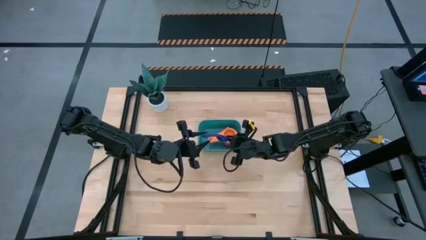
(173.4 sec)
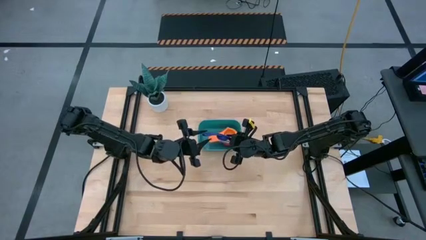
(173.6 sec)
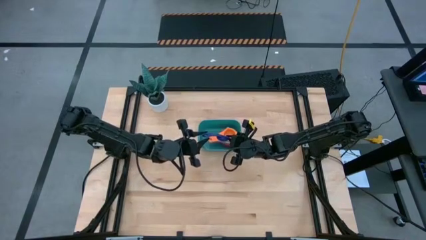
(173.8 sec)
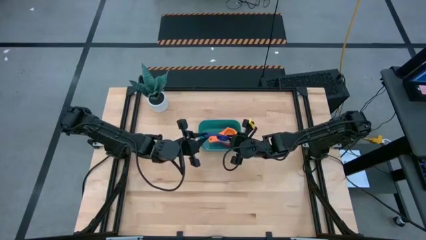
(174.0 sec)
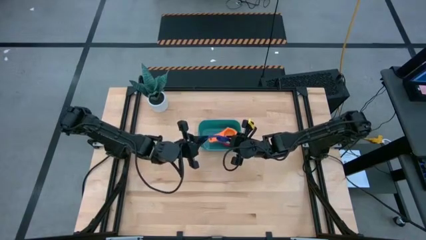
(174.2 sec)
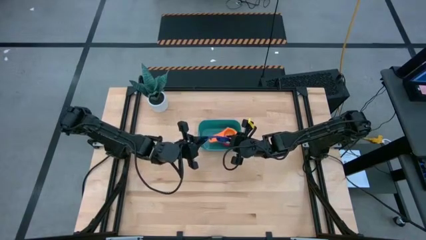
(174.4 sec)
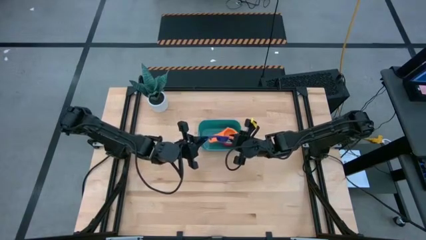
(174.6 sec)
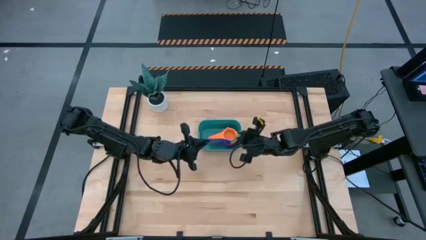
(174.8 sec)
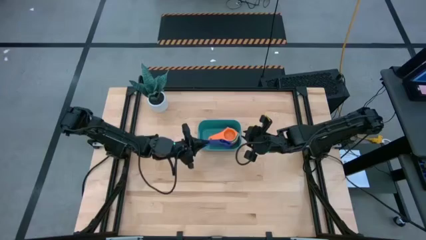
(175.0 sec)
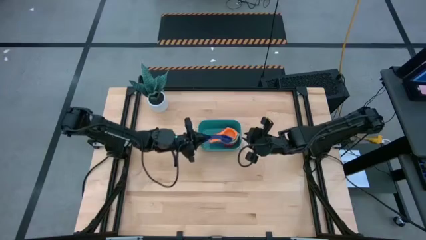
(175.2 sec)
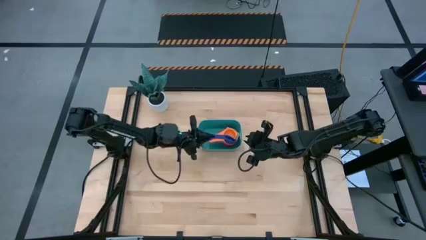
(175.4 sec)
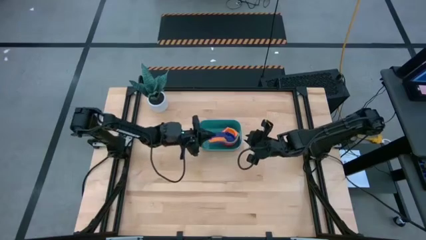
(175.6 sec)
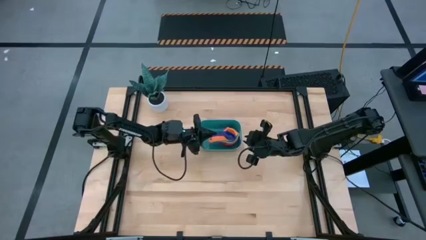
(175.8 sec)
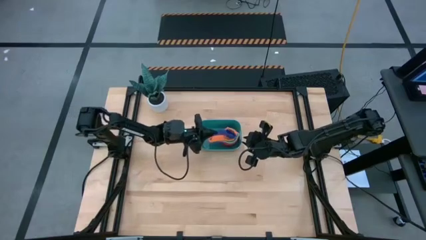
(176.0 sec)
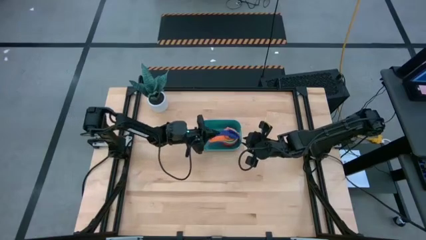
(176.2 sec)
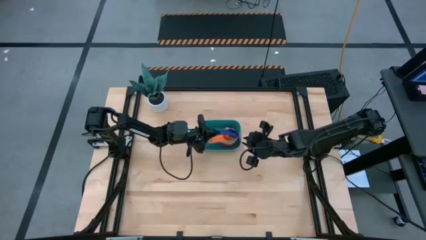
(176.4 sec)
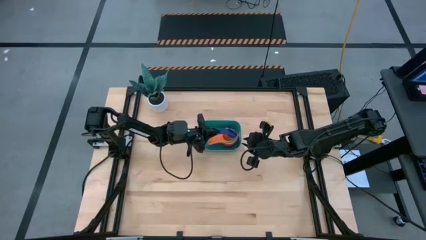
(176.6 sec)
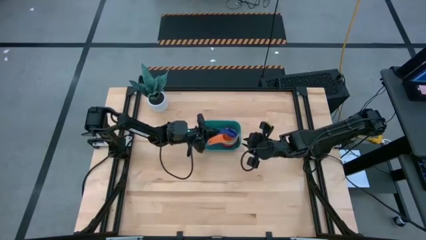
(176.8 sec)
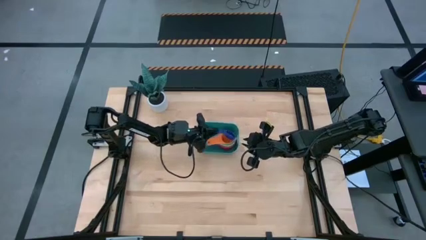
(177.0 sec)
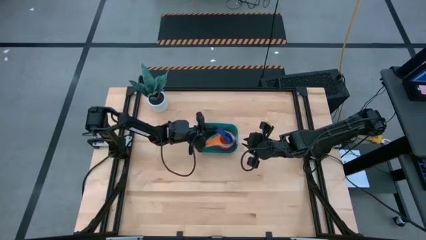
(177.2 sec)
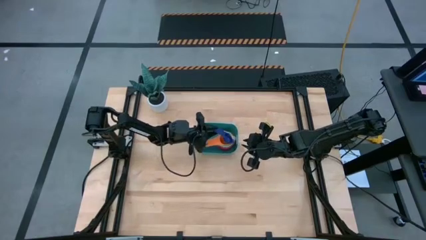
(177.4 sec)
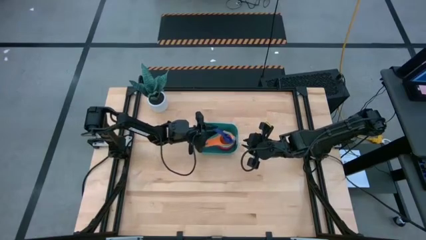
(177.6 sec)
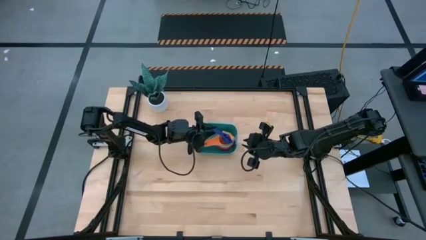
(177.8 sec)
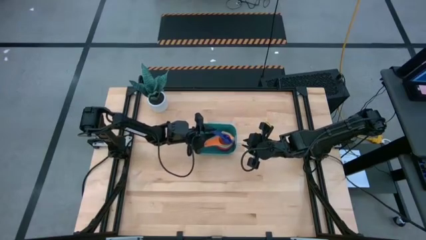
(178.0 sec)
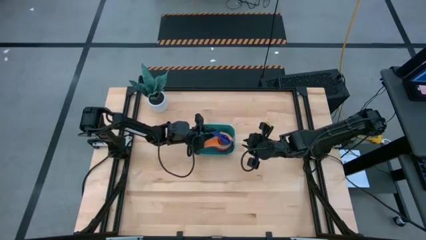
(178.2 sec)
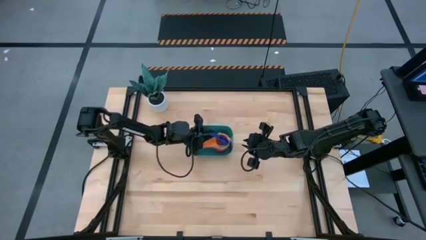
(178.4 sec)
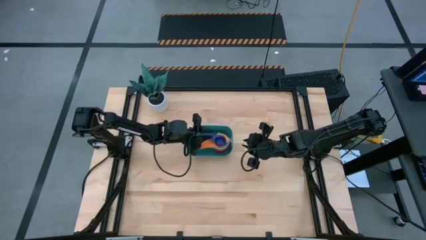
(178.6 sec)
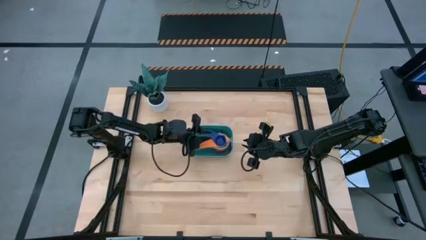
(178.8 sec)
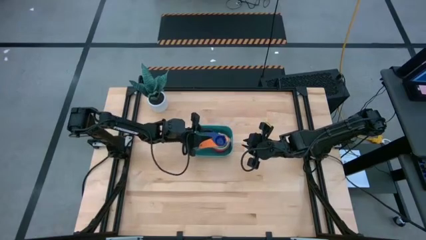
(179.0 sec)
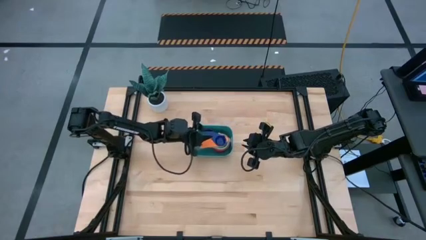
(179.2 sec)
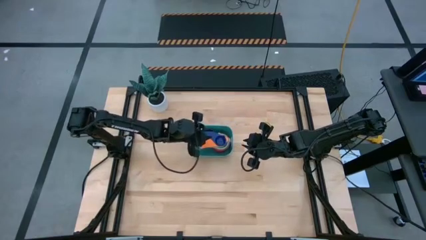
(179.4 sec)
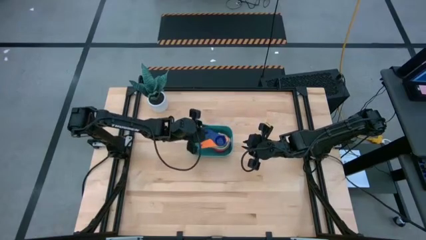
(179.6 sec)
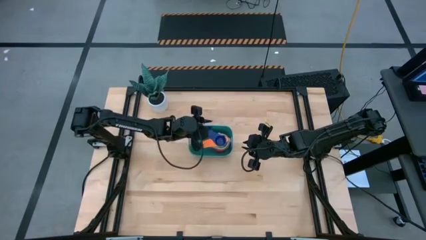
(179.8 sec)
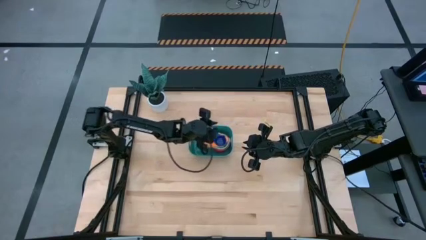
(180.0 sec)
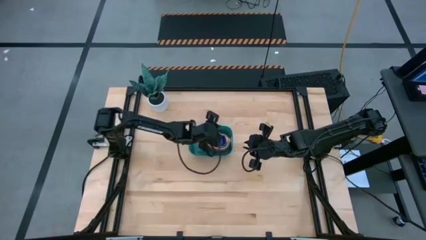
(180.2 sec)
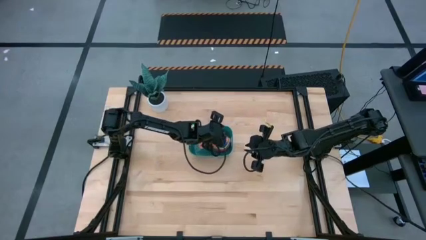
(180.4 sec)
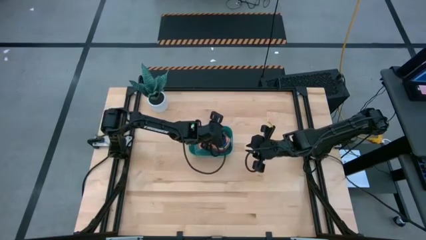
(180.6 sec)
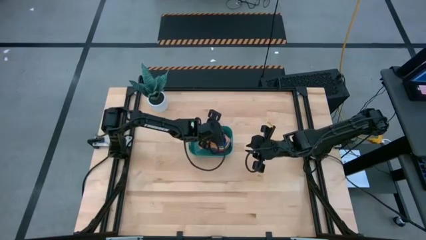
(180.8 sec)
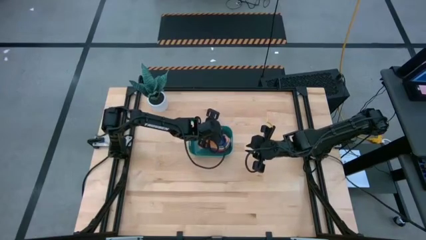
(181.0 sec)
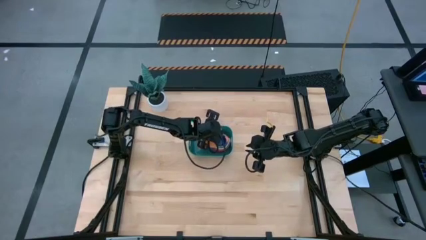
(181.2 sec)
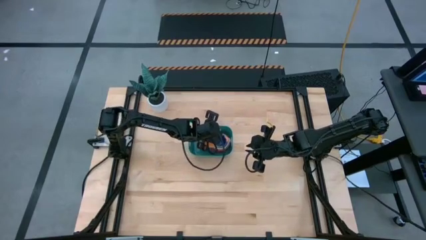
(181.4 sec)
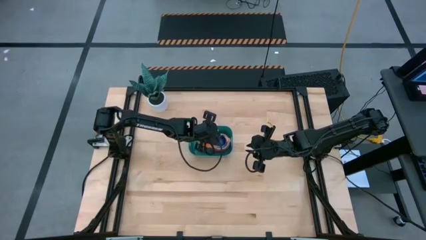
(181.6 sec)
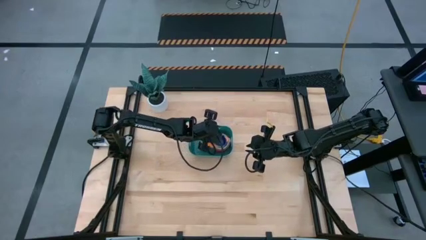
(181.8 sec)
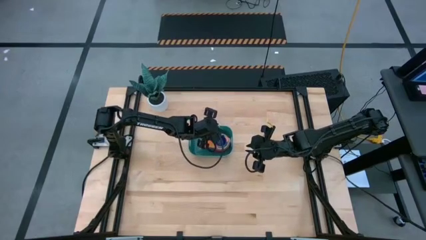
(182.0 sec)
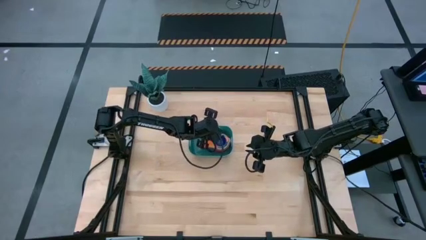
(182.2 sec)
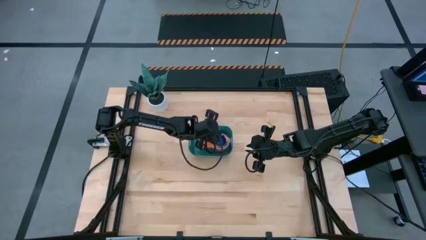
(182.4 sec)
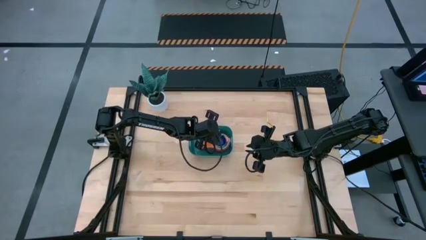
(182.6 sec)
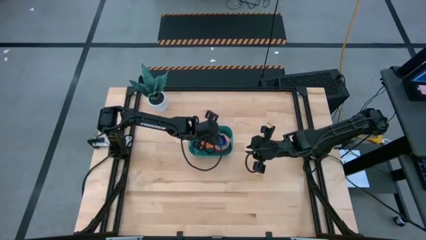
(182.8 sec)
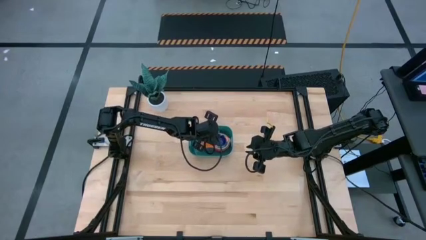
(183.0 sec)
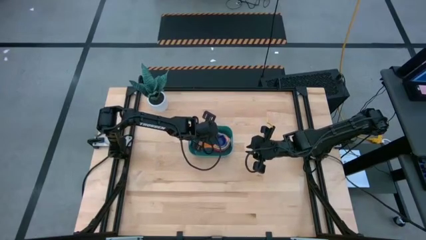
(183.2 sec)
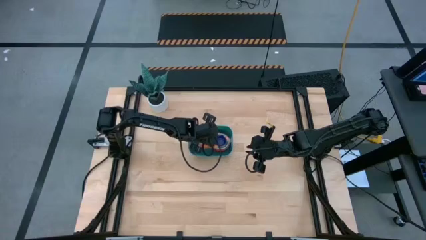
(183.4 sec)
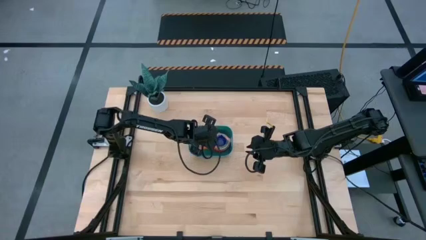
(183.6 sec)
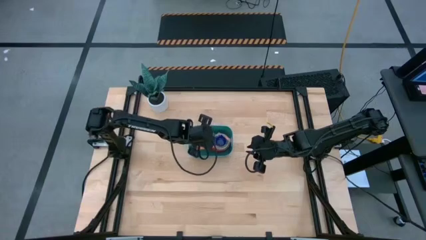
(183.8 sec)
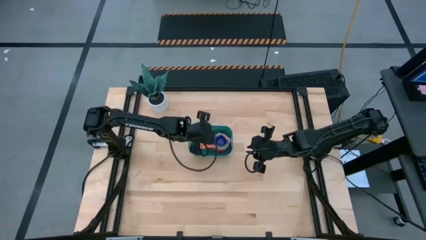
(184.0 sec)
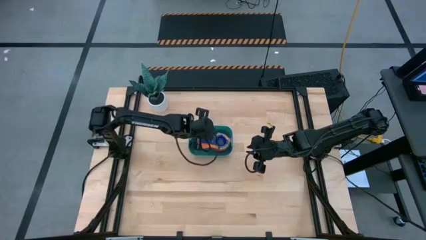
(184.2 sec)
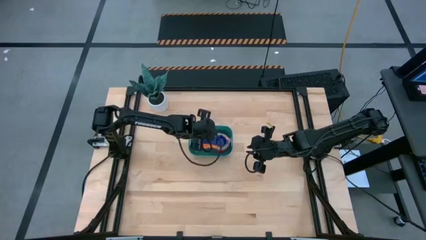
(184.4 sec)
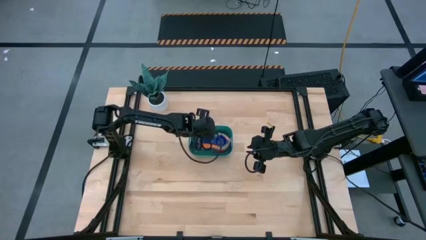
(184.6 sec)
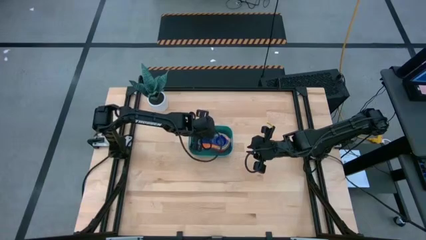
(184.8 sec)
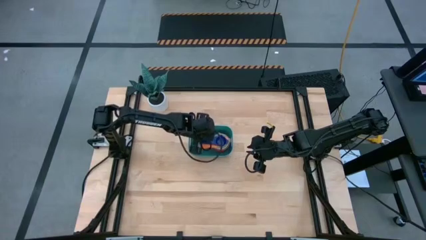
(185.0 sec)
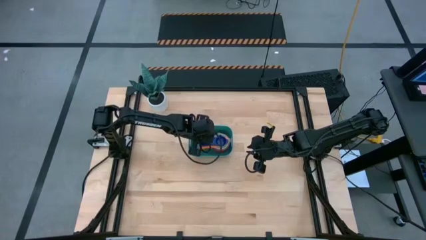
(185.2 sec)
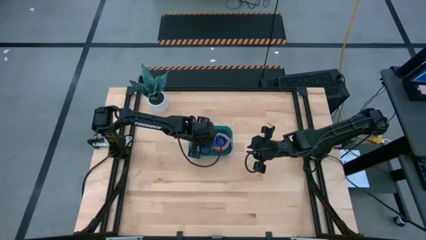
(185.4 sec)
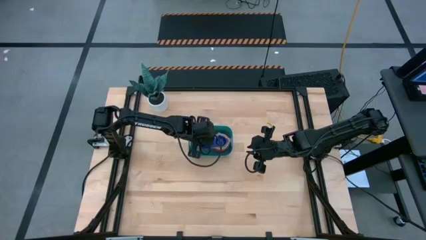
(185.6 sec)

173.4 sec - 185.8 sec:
Task: Nest measuring cups in basket
Stack the dark blue measuring cup on top of the orange measuring cup inside the light blue bin
